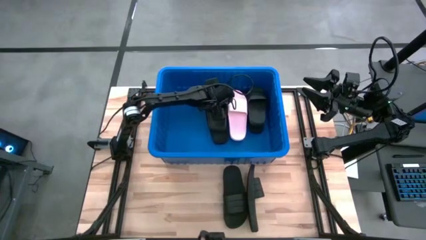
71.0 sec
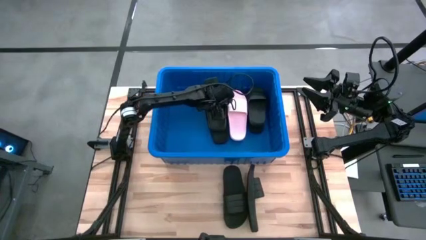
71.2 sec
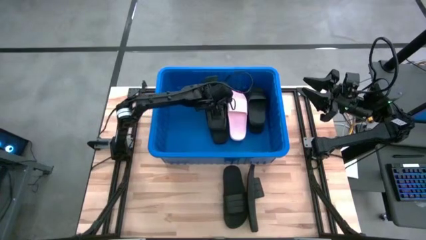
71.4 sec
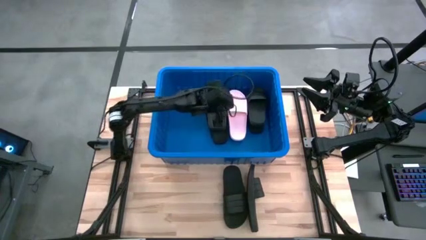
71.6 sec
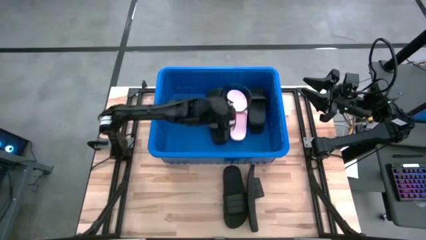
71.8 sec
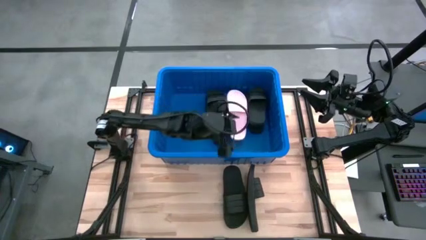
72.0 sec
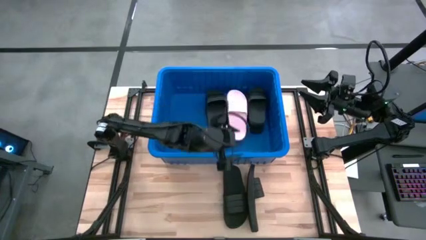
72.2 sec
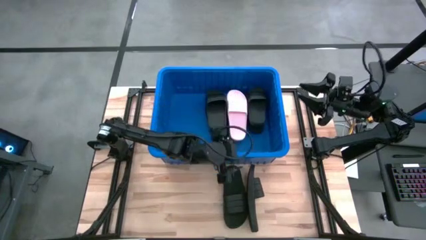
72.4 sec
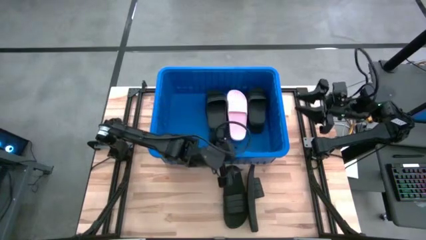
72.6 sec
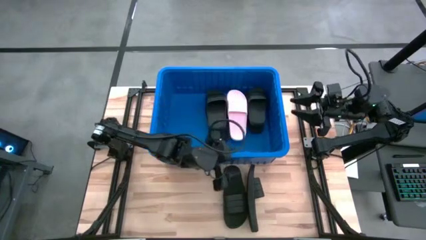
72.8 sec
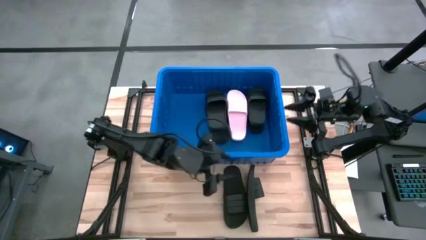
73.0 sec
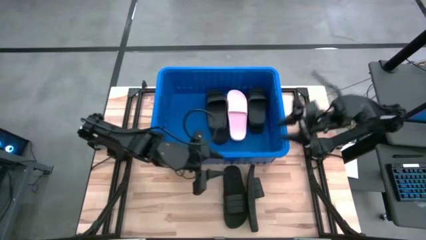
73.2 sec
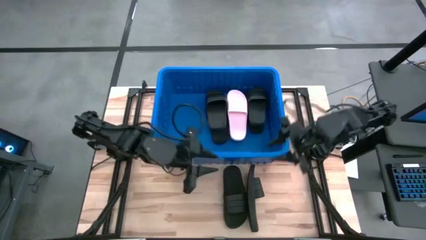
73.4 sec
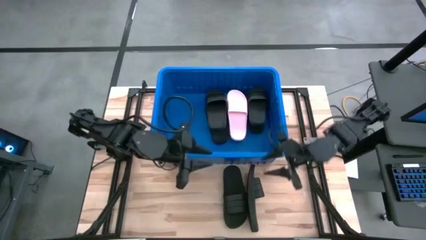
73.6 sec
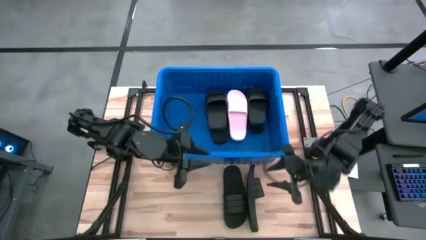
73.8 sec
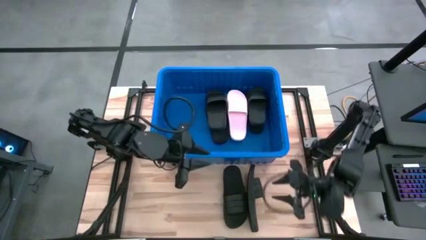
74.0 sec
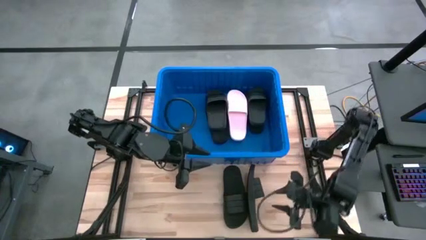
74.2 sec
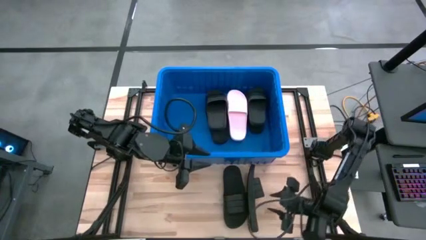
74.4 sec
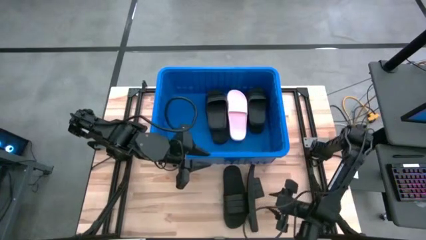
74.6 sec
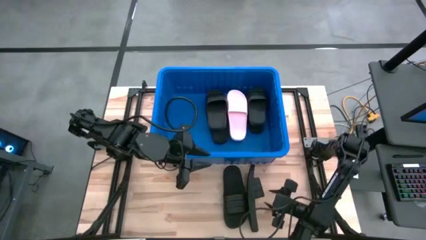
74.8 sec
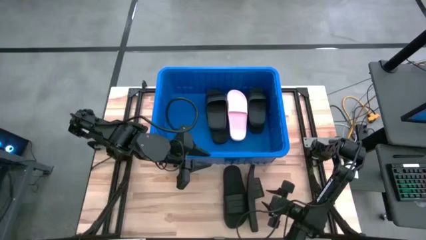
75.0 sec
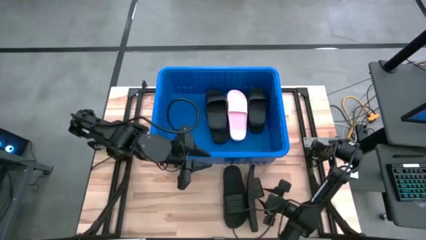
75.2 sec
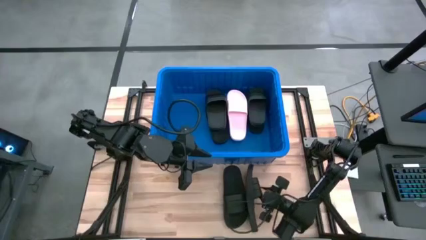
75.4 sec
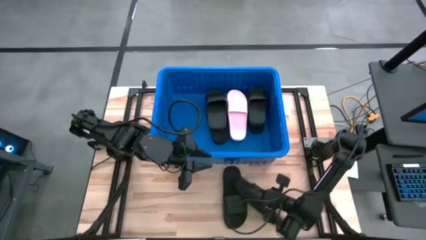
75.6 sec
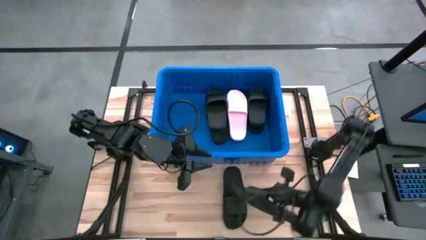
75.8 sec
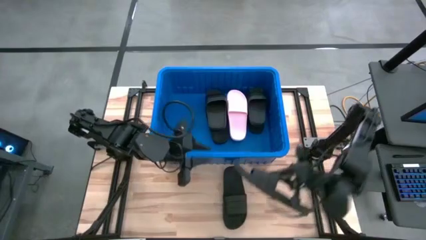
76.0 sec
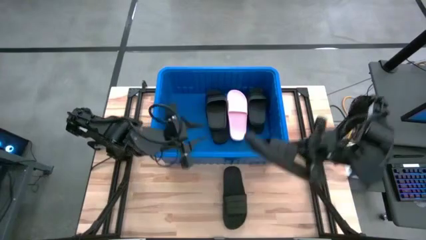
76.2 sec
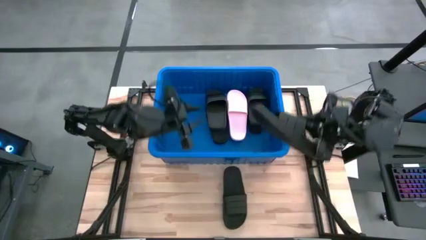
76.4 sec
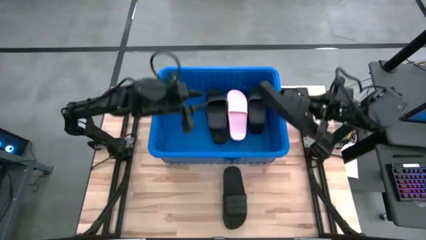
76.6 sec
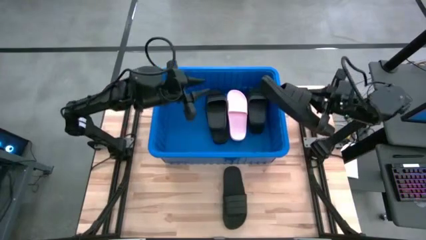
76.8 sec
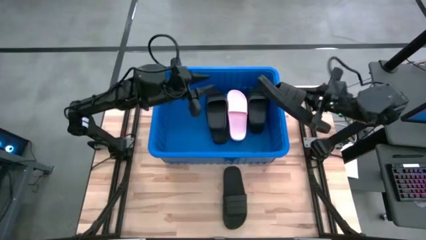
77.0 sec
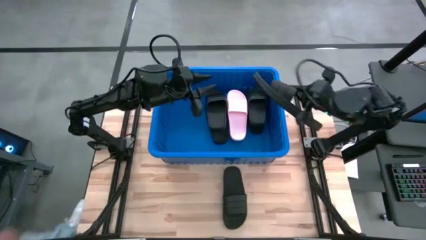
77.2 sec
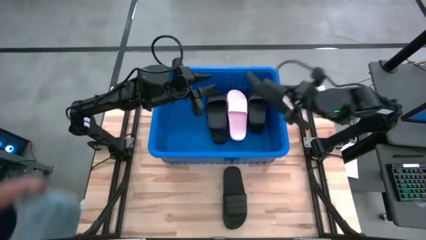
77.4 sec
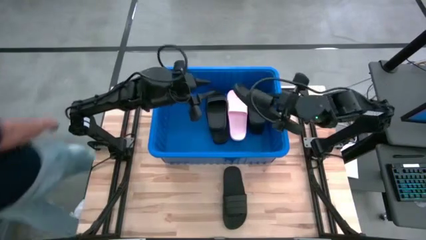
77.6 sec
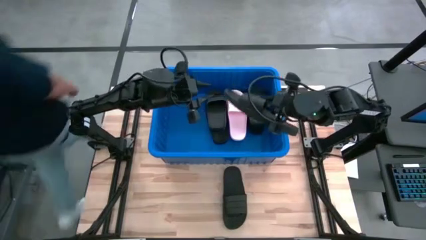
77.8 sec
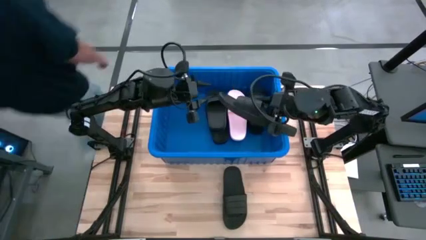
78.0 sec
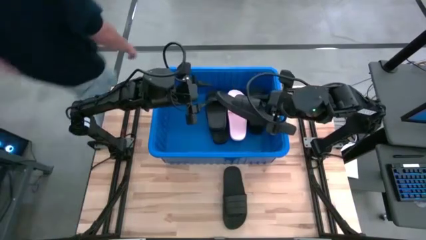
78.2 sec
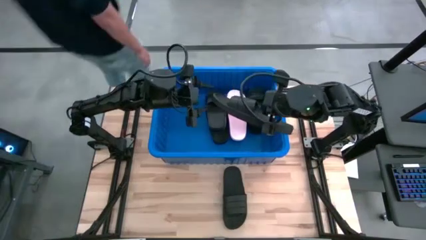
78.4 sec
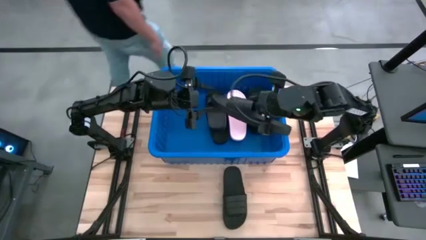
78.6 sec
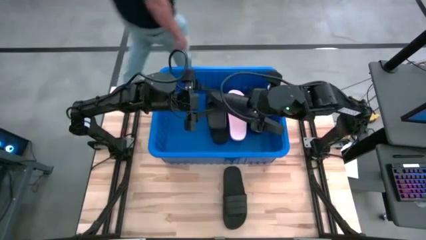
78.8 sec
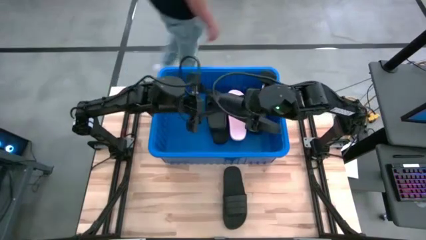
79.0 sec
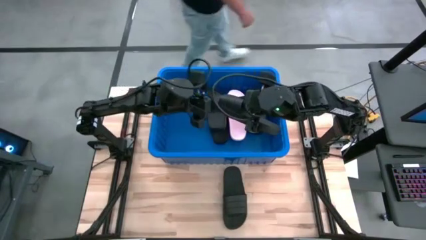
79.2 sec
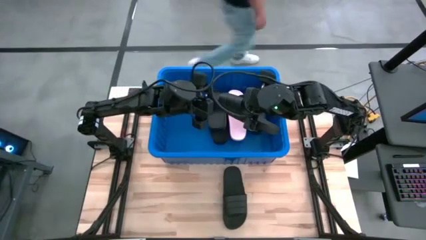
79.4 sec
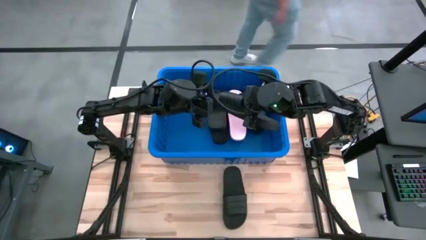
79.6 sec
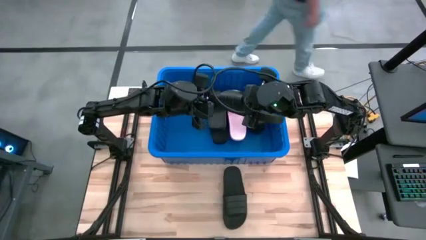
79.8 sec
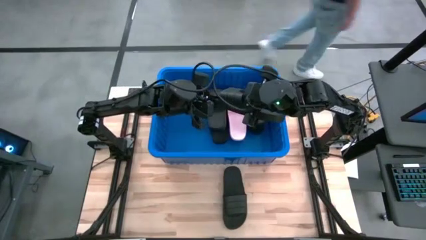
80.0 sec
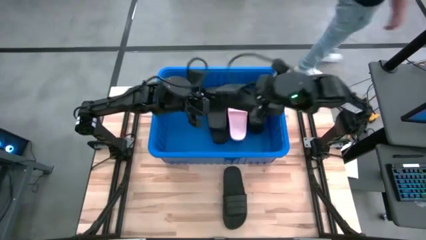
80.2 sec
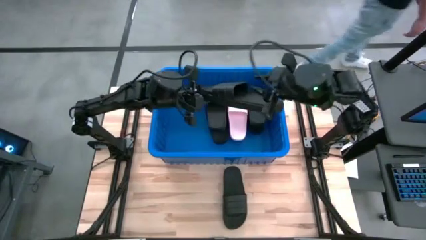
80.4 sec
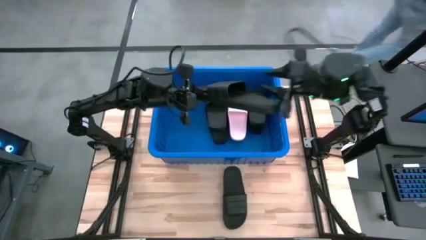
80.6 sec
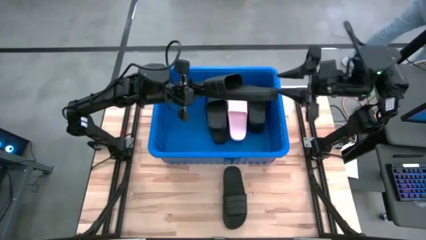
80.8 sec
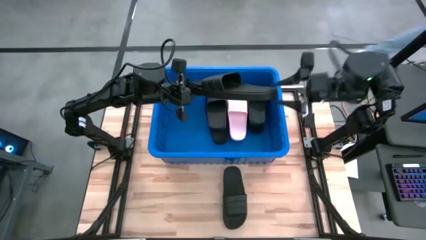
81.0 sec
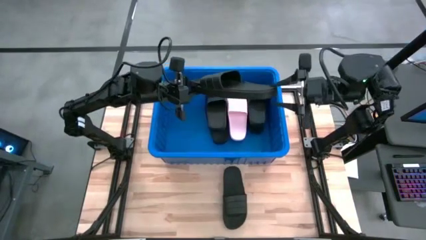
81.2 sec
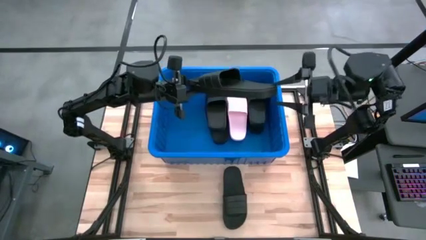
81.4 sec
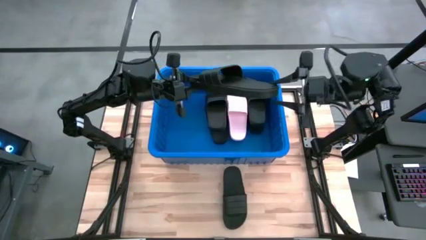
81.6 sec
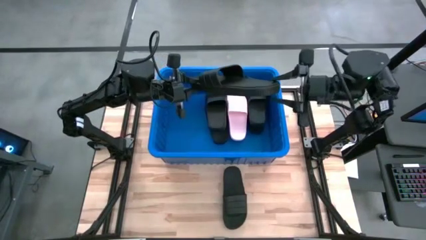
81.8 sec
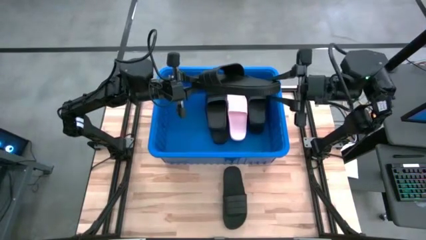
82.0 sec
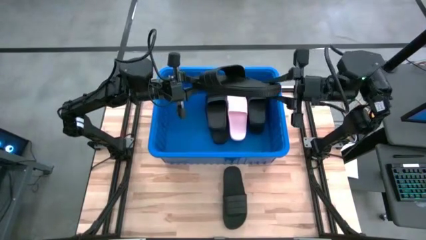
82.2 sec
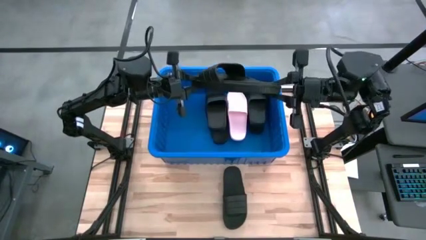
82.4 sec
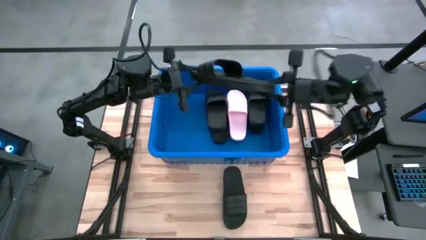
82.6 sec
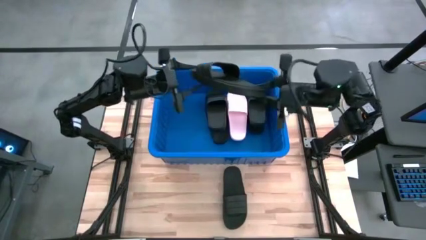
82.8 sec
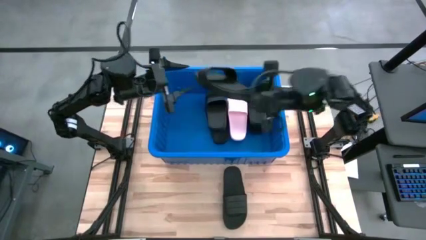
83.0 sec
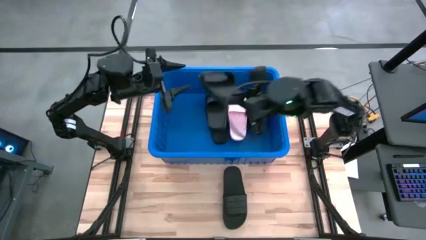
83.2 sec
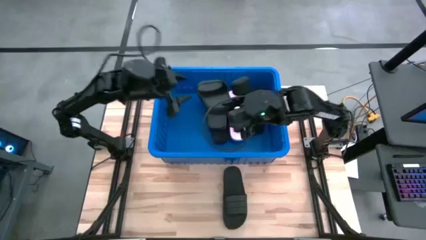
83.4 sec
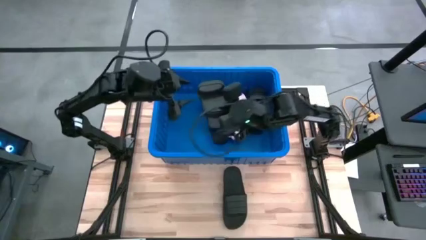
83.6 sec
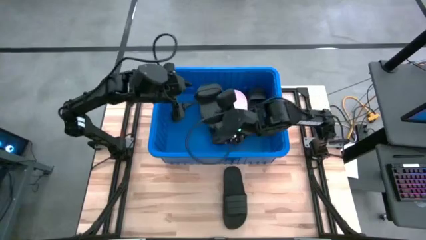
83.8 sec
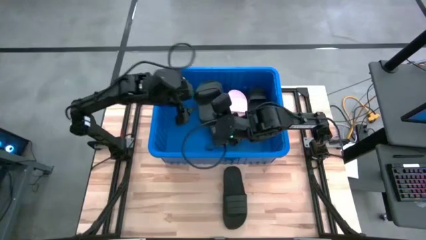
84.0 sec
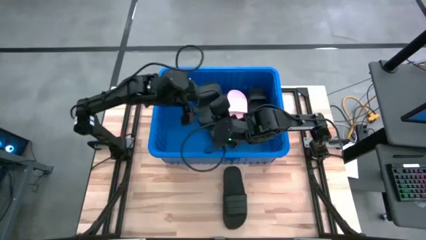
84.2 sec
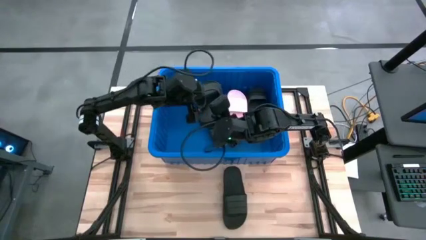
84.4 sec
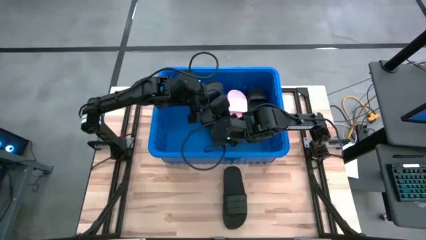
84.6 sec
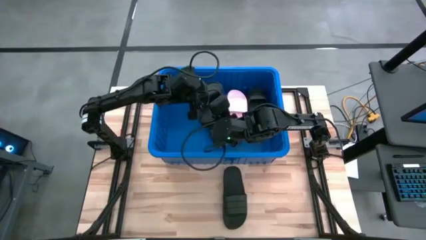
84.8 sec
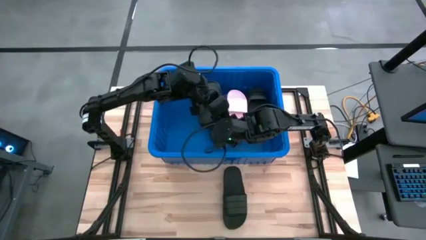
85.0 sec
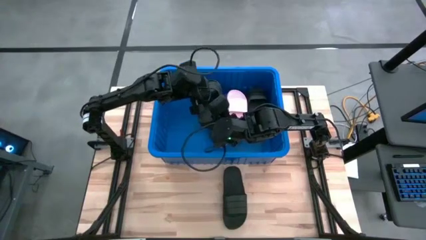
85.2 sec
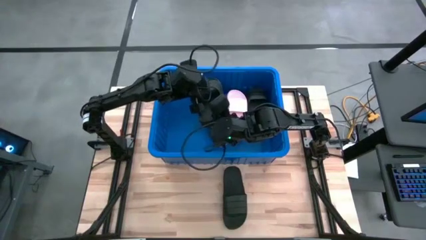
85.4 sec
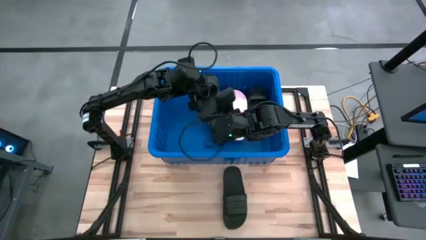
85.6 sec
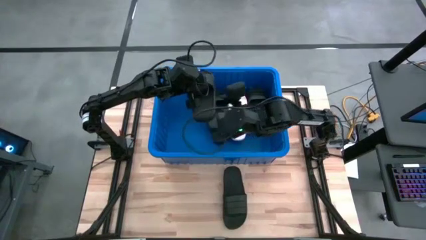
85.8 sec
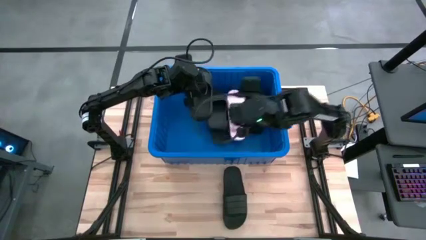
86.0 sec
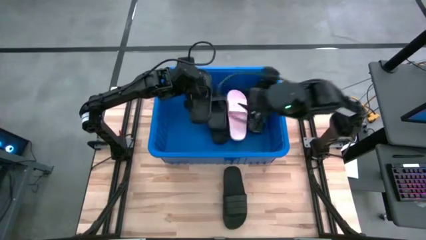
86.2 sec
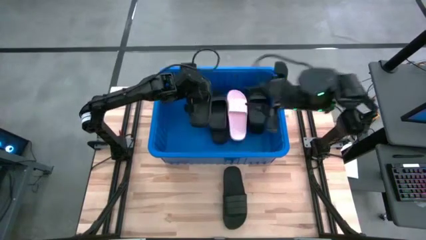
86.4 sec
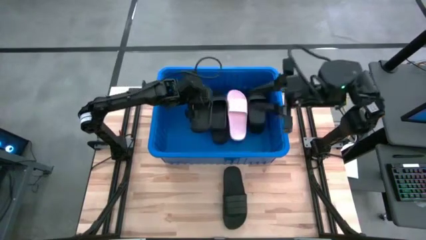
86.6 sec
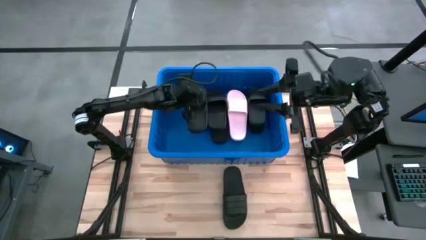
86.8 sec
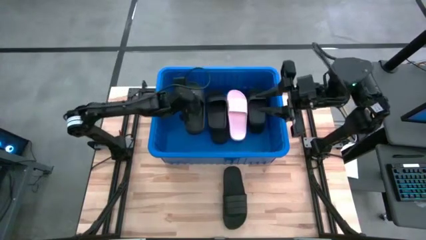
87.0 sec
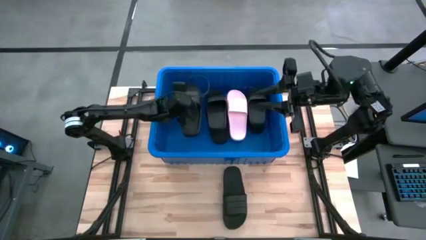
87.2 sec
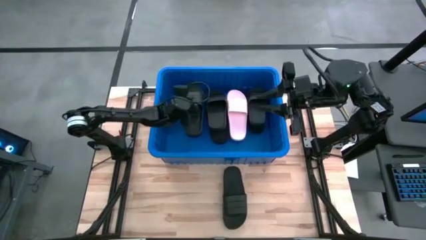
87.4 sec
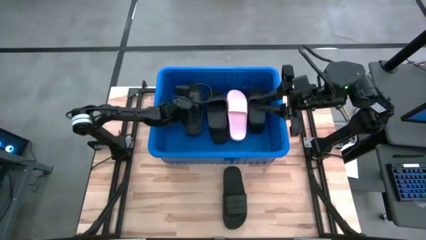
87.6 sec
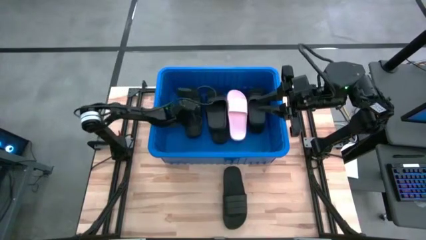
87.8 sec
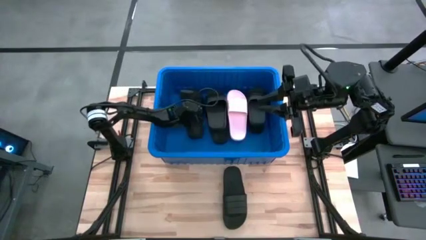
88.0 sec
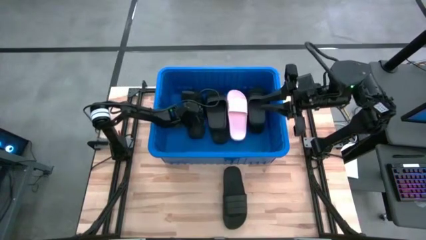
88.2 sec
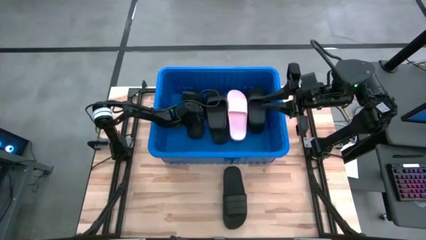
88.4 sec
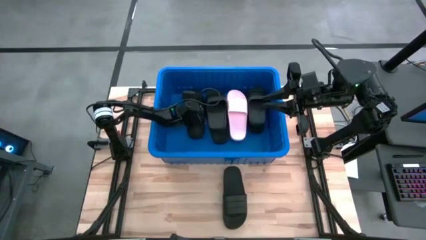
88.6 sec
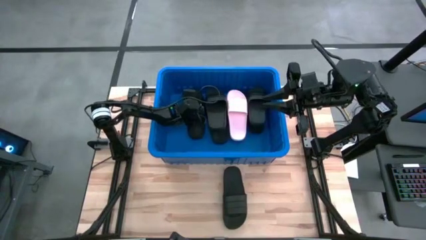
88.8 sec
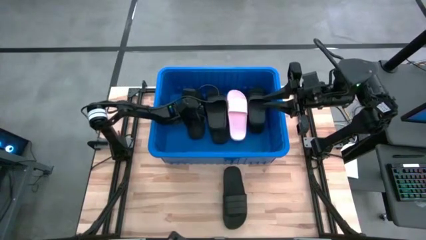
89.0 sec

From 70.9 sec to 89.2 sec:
Task: Pick and place slides into bin
Put the black slide into the bin
